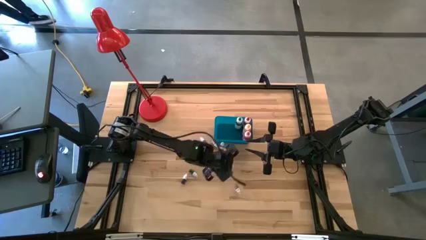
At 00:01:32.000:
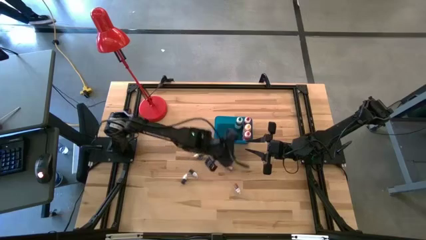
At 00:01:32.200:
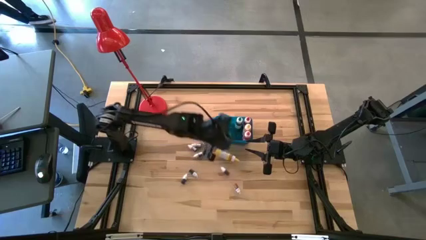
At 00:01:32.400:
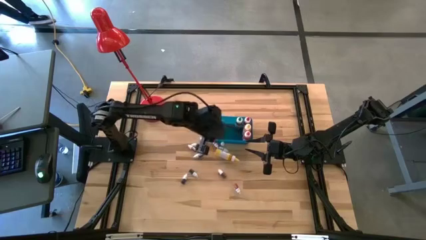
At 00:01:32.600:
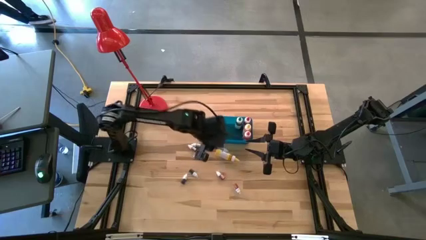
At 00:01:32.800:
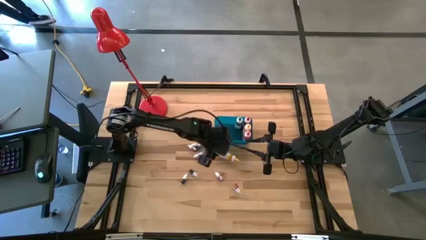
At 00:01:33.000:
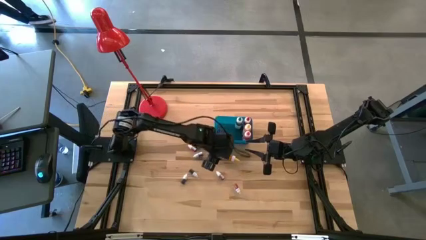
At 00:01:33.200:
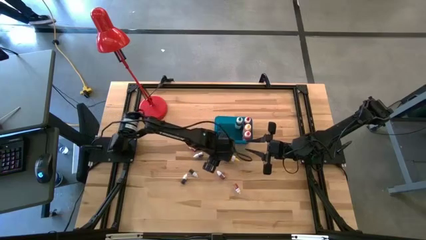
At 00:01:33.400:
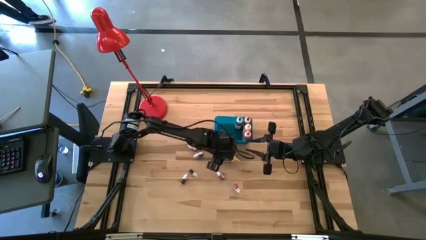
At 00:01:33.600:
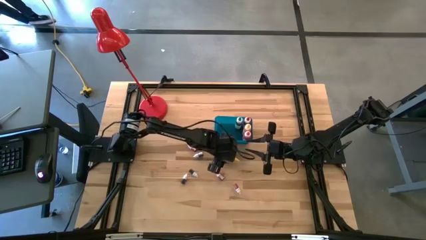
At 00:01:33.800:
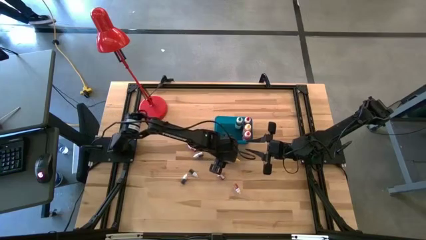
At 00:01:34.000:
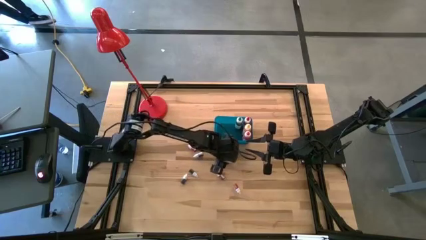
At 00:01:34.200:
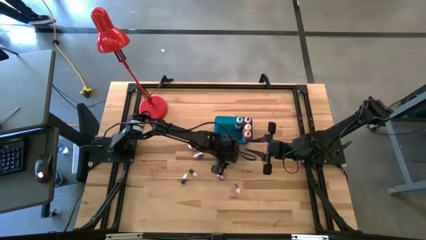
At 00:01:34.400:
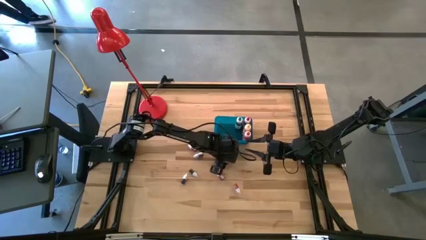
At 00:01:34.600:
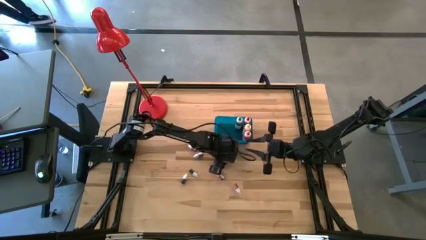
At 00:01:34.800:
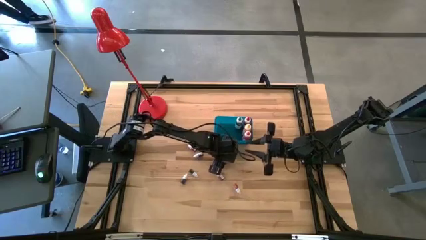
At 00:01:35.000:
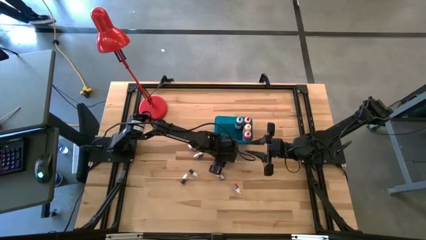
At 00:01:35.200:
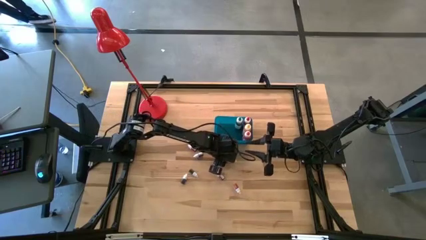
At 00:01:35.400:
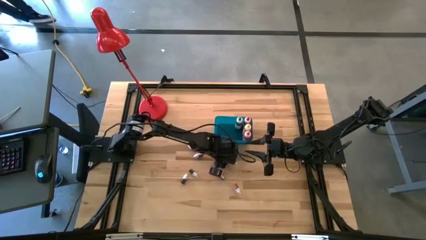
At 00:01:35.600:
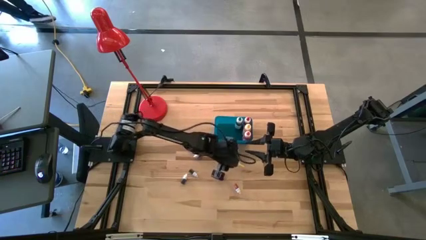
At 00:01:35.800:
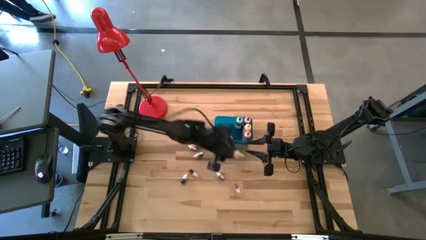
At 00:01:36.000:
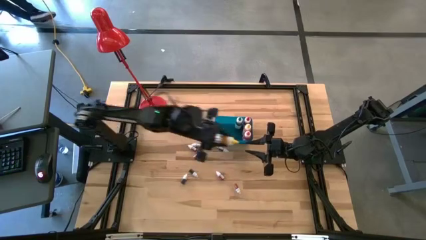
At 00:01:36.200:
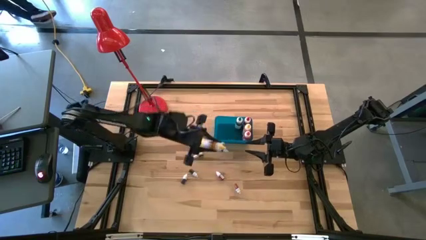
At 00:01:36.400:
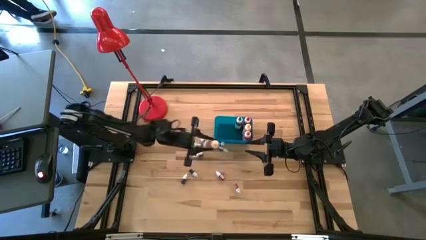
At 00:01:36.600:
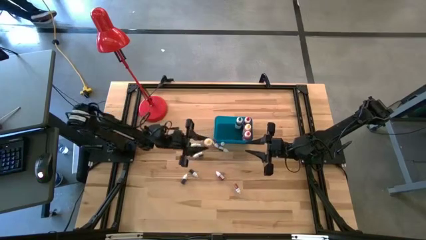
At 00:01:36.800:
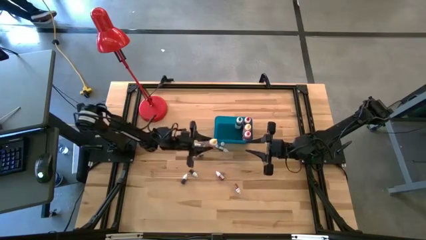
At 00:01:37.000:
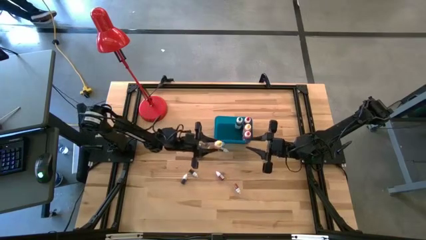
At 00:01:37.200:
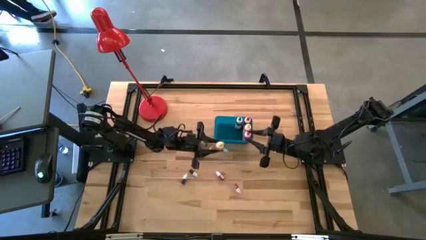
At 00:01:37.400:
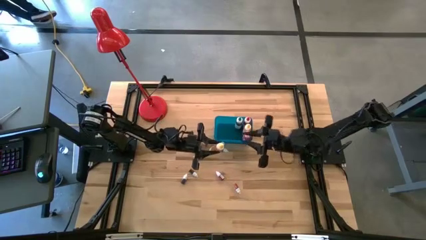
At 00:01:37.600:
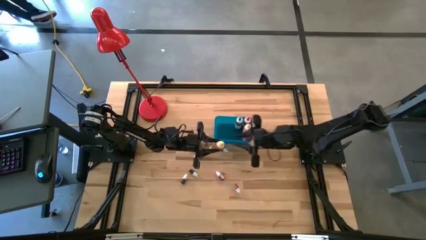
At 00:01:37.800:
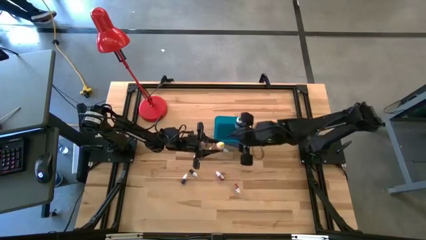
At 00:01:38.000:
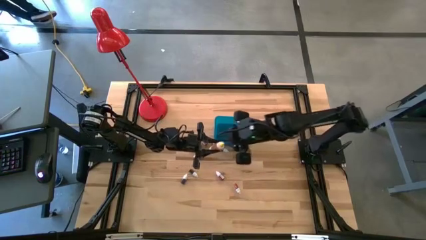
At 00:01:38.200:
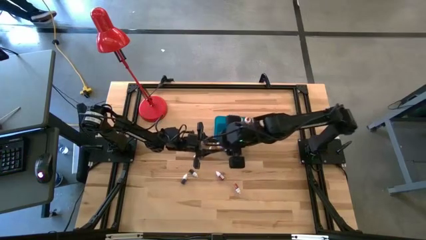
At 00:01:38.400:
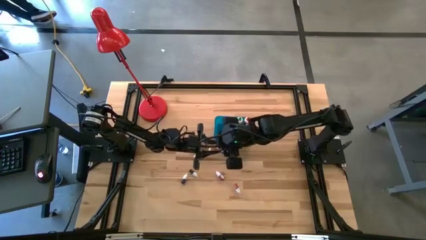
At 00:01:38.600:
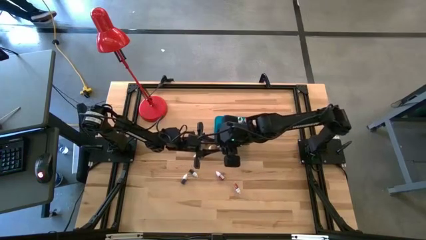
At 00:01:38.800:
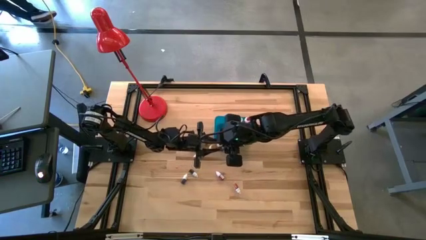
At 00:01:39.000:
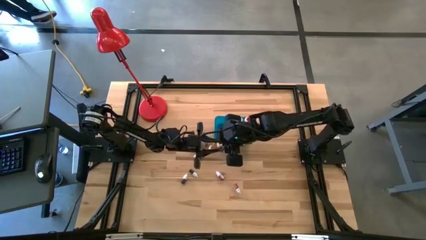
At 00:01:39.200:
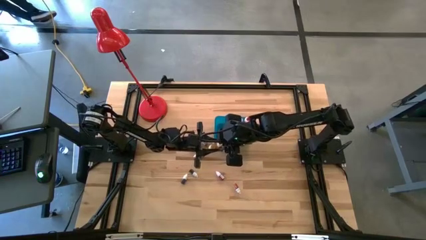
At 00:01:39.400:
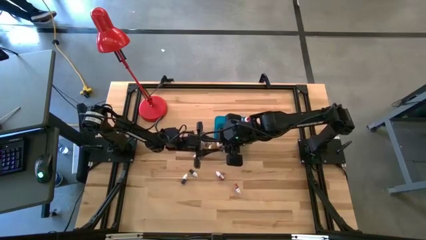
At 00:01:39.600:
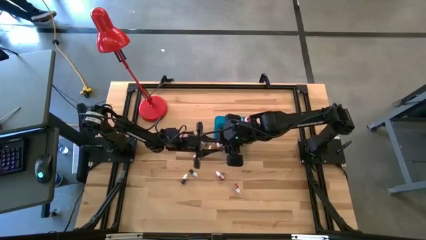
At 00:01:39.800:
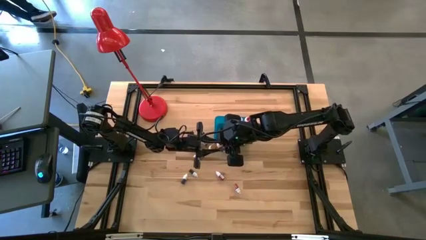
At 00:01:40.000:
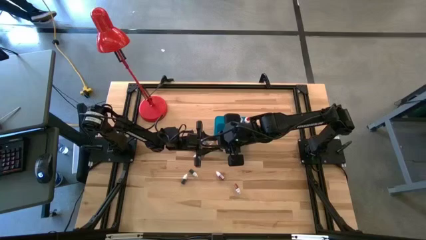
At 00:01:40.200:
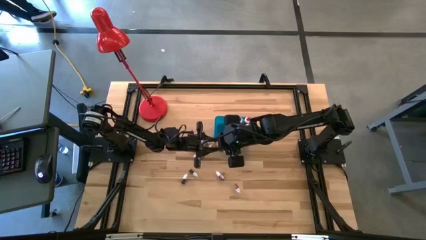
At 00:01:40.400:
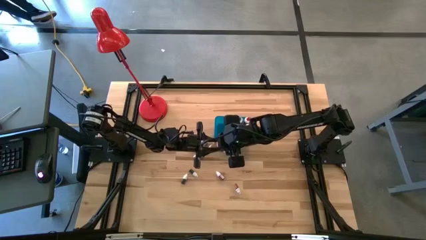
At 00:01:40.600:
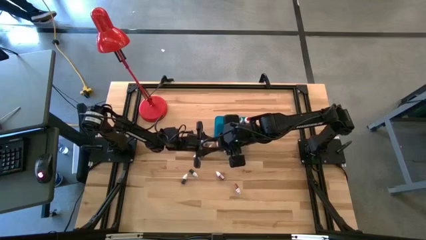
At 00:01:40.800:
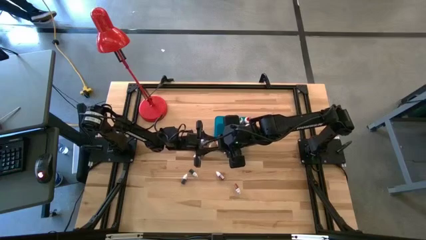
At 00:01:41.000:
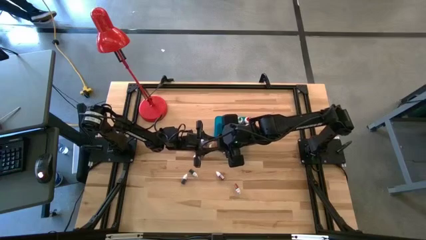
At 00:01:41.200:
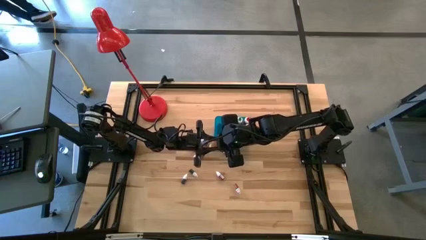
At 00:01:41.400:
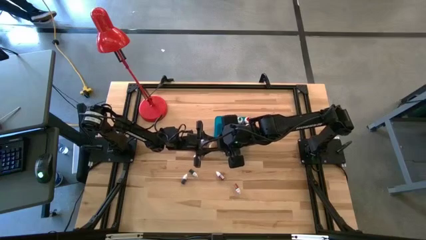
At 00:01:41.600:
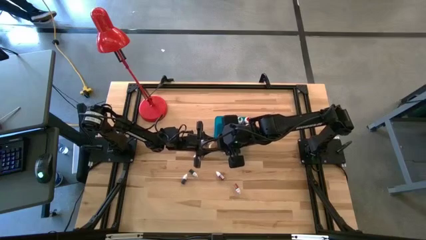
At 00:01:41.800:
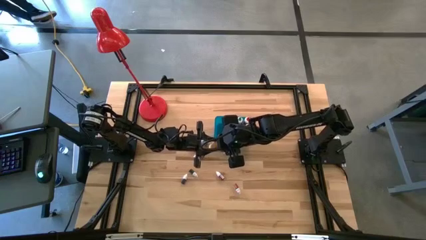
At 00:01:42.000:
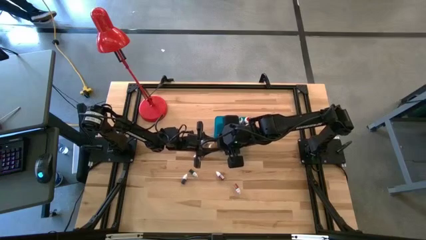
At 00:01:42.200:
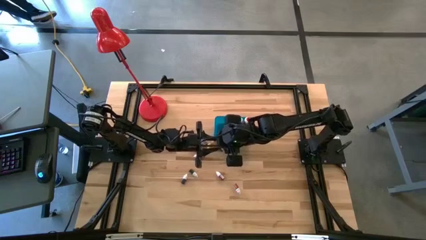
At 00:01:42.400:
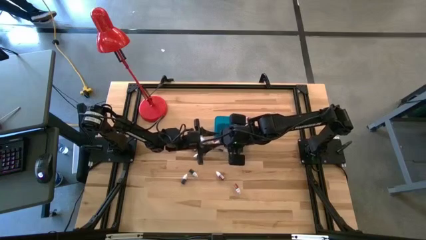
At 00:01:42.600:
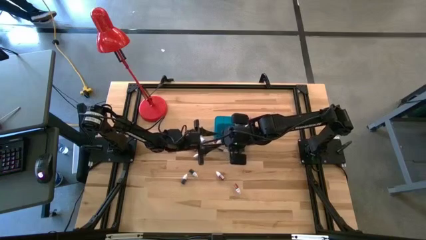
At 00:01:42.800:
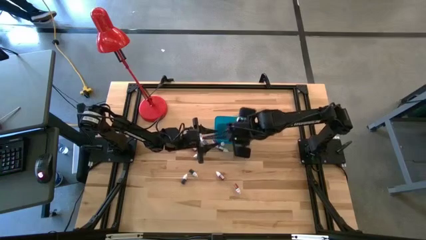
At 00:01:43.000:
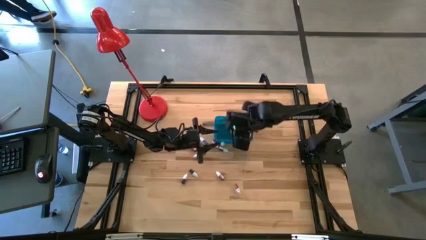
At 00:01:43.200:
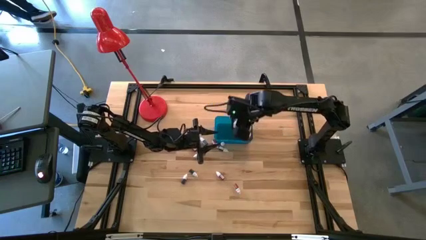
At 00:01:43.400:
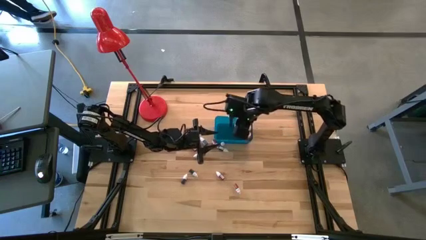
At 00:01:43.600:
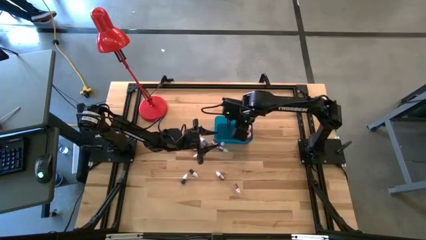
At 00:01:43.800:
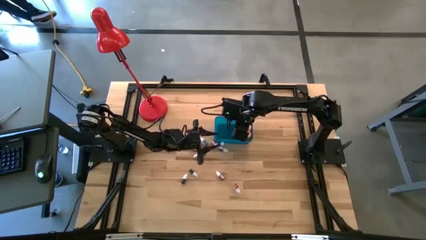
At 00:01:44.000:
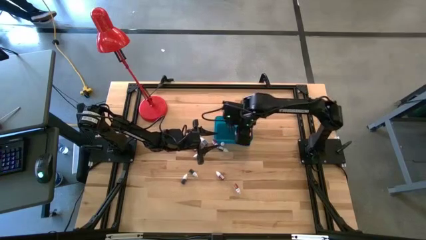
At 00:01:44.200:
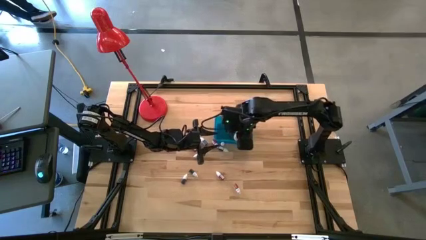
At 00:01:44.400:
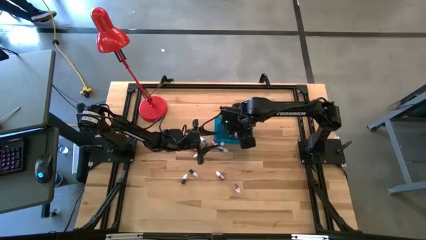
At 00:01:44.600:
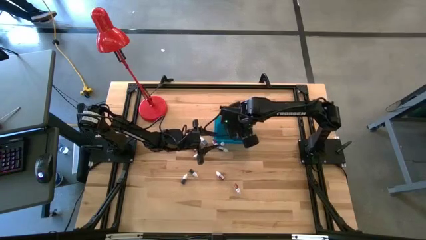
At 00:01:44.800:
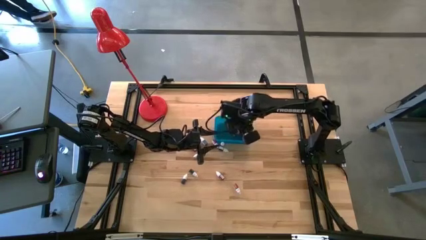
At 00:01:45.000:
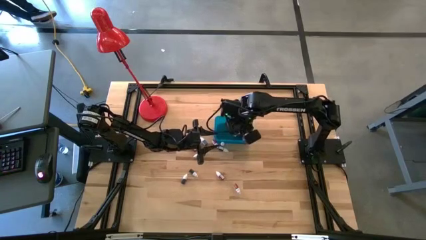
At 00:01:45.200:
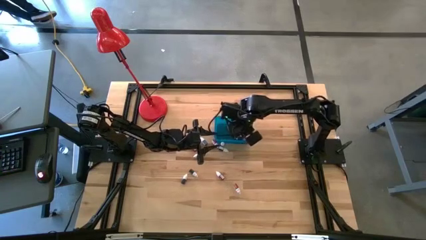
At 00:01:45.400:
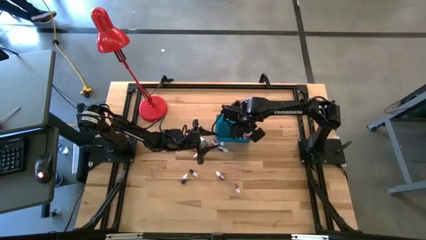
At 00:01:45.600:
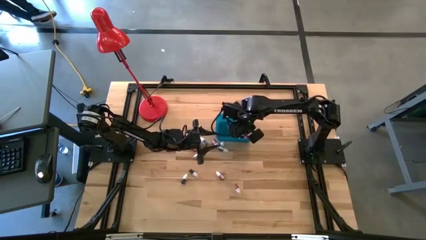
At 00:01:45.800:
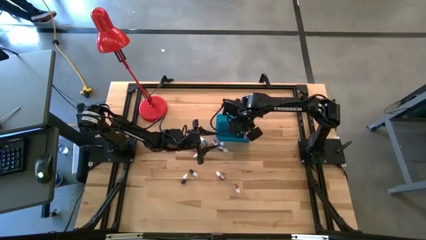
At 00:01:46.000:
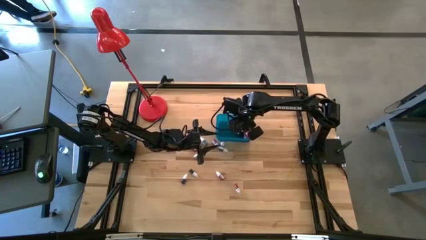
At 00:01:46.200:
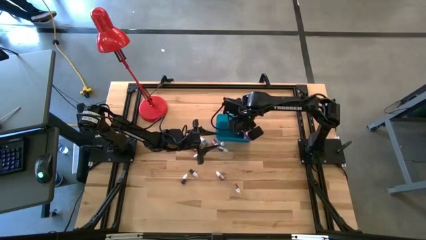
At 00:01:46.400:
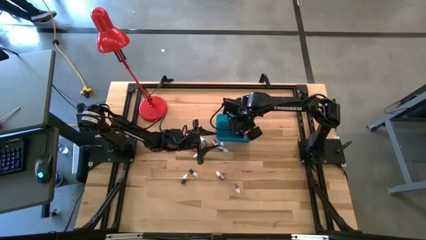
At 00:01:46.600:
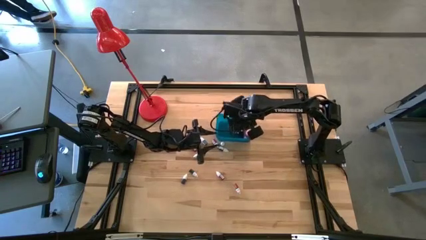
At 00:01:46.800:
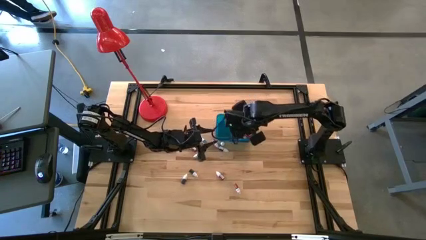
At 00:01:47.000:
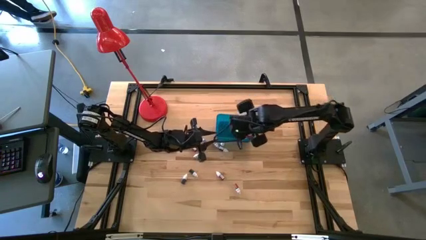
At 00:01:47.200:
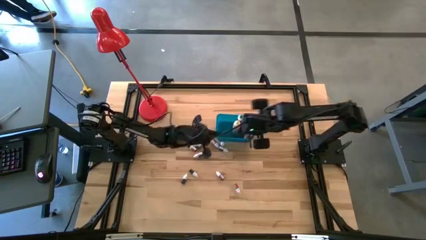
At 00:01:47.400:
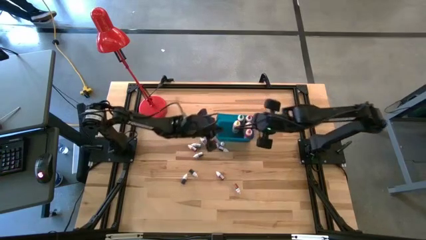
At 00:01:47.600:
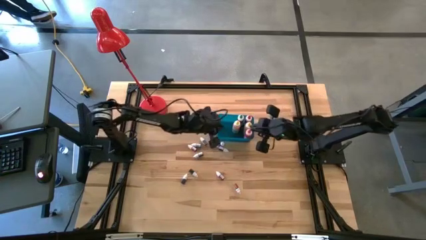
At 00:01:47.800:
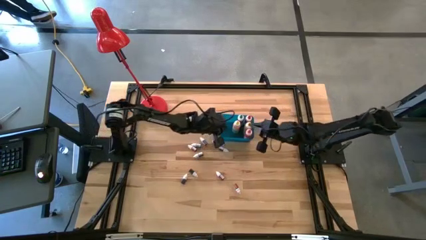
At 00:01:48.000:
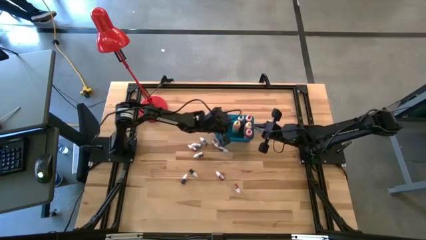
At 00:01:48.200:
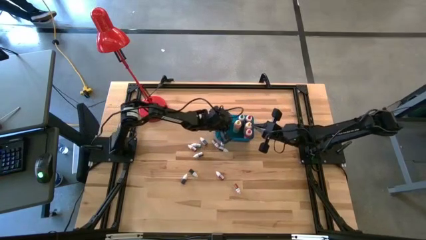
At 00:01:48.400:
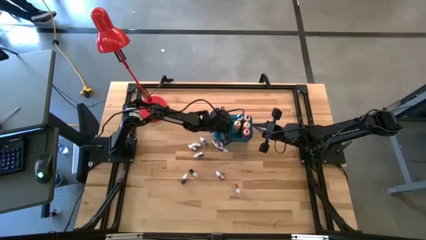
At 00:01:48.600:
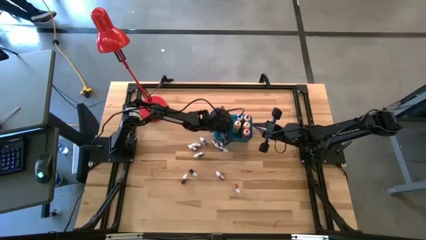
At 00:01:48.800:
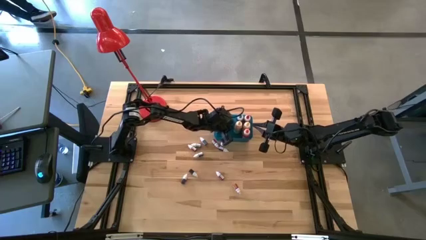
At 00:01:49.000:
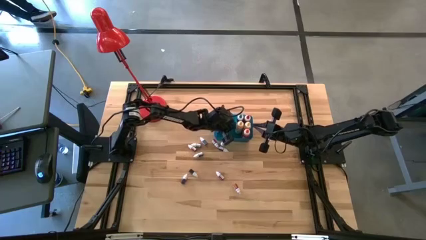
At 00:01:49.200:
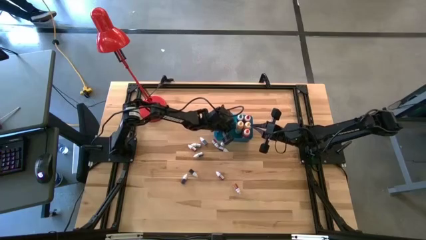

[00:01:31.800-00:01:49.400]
Task: Pick & Place food coloring
Put the big yellow food coloring bottle into the blue bin
